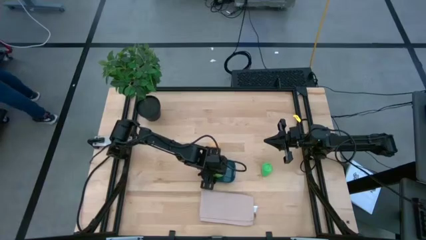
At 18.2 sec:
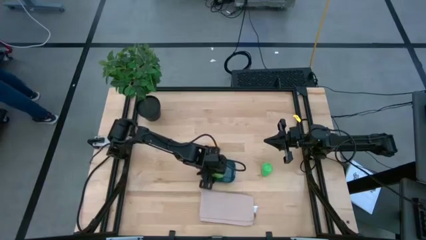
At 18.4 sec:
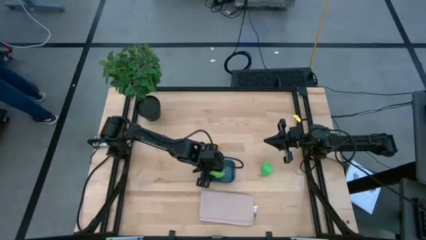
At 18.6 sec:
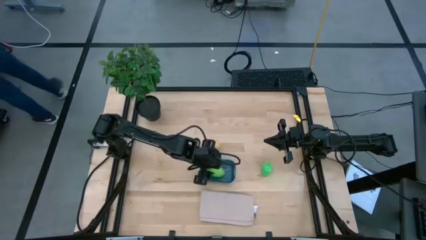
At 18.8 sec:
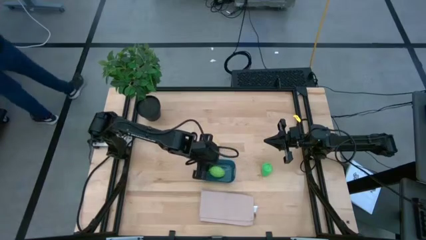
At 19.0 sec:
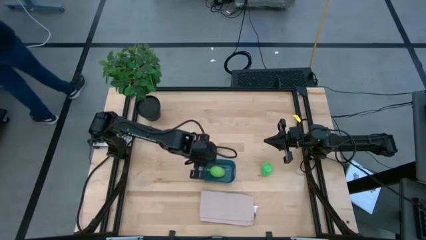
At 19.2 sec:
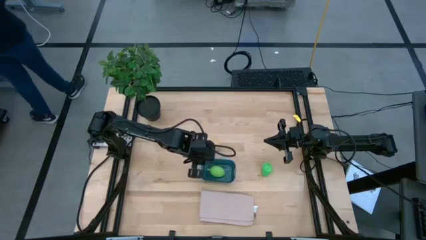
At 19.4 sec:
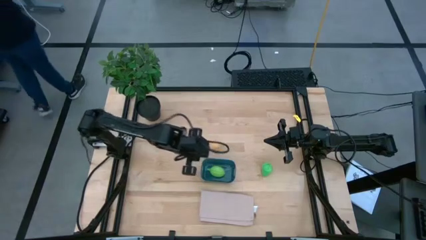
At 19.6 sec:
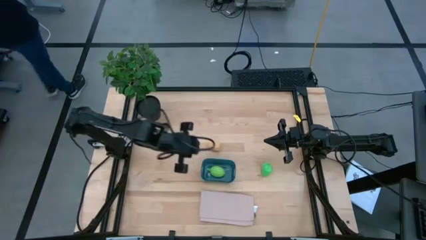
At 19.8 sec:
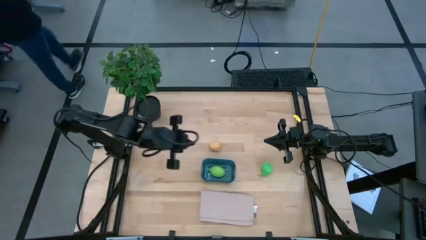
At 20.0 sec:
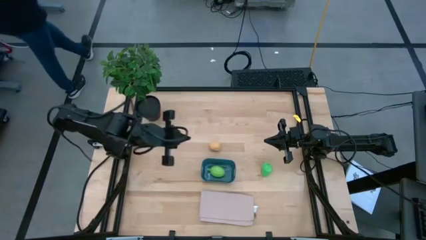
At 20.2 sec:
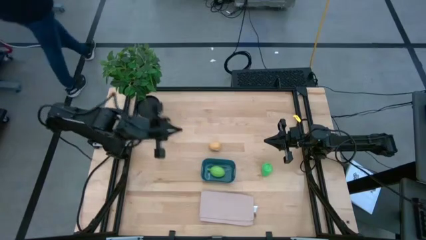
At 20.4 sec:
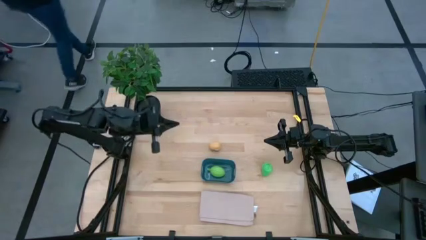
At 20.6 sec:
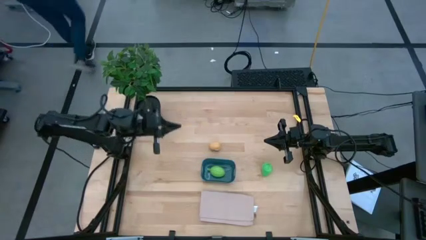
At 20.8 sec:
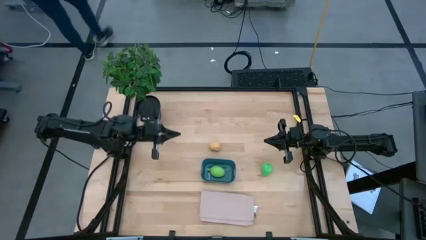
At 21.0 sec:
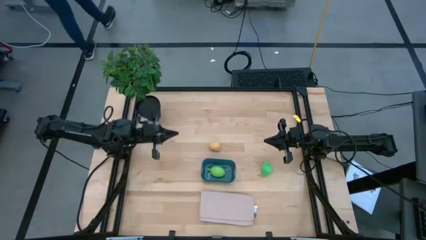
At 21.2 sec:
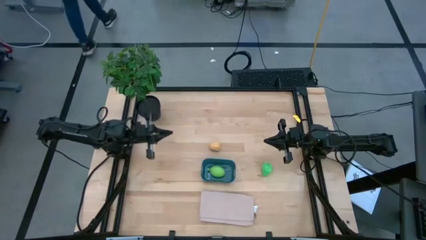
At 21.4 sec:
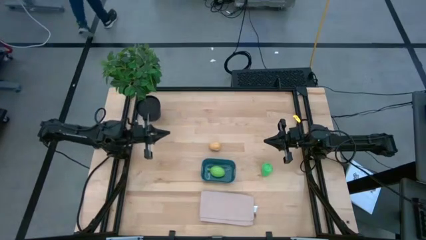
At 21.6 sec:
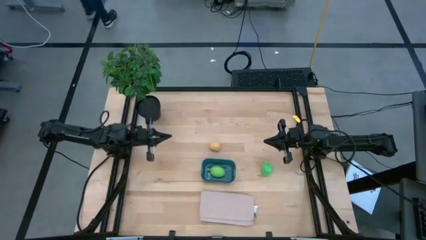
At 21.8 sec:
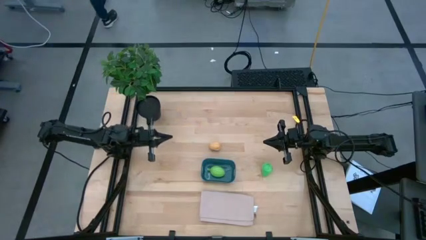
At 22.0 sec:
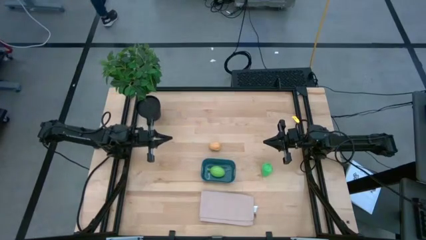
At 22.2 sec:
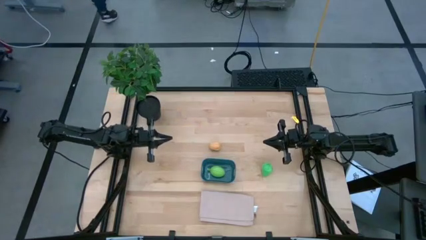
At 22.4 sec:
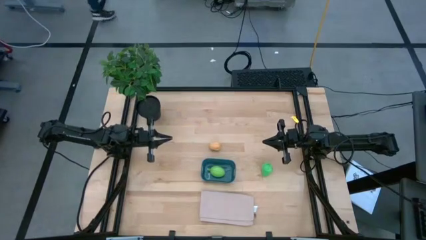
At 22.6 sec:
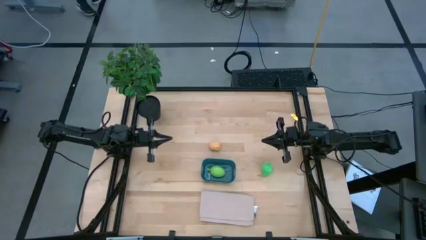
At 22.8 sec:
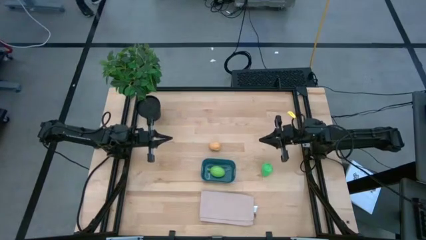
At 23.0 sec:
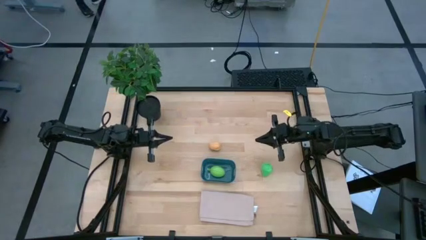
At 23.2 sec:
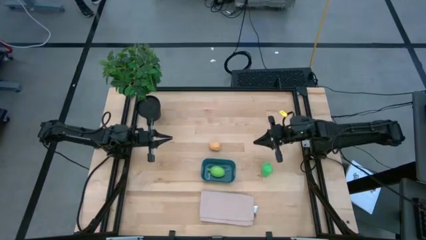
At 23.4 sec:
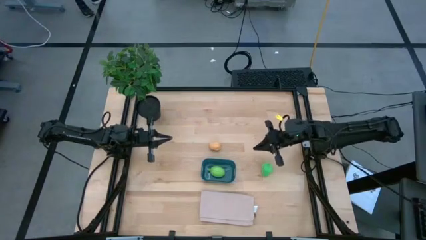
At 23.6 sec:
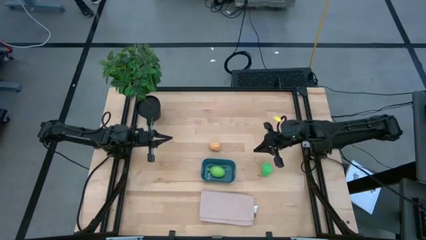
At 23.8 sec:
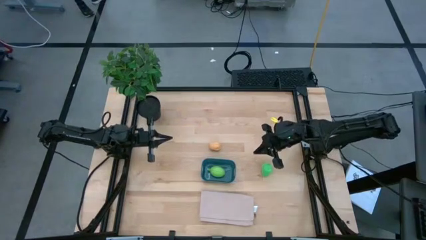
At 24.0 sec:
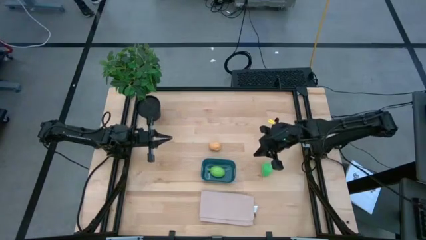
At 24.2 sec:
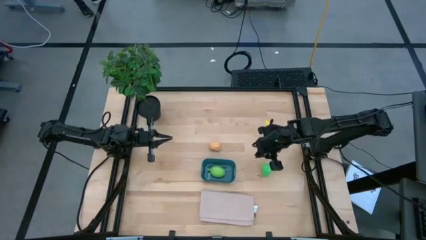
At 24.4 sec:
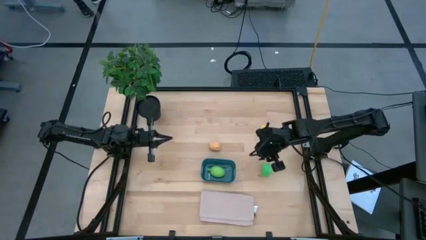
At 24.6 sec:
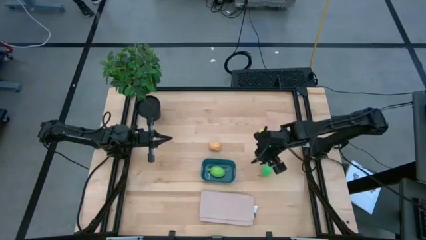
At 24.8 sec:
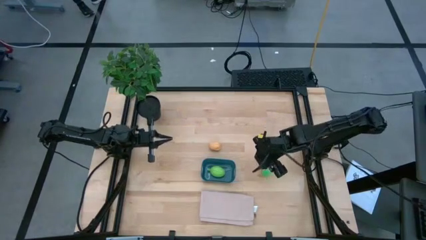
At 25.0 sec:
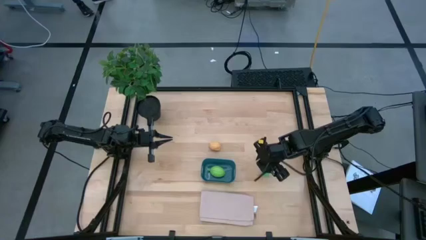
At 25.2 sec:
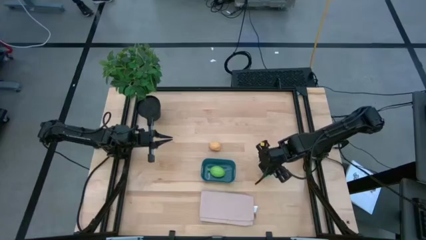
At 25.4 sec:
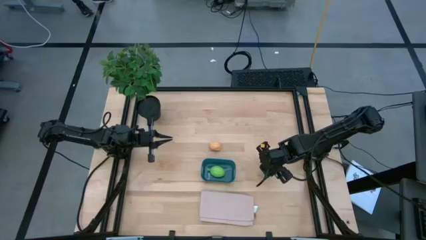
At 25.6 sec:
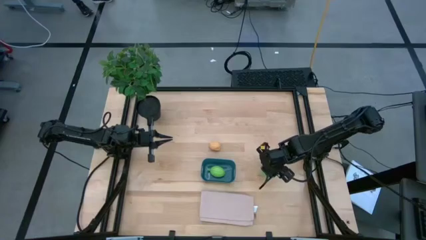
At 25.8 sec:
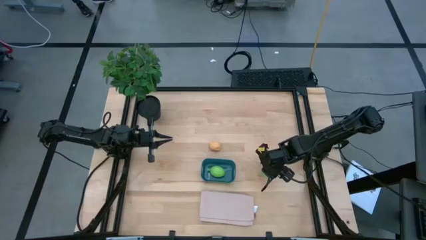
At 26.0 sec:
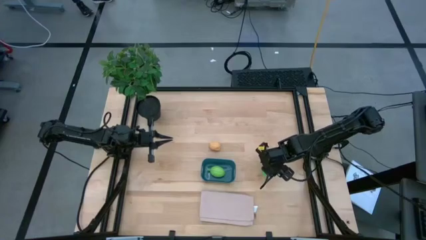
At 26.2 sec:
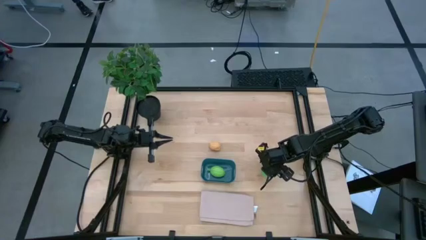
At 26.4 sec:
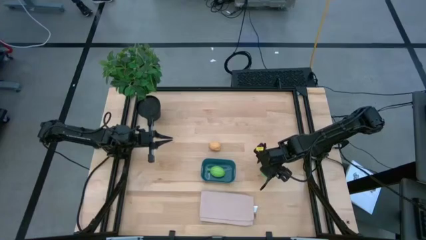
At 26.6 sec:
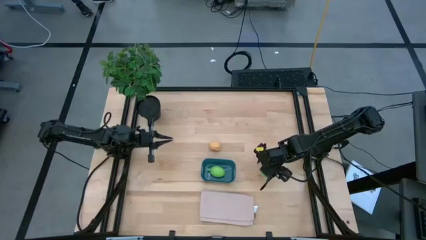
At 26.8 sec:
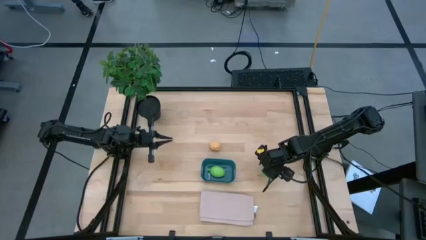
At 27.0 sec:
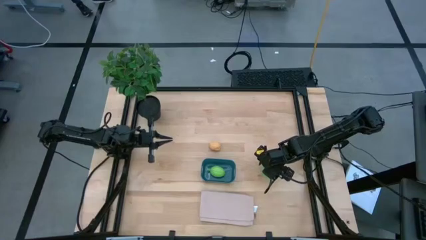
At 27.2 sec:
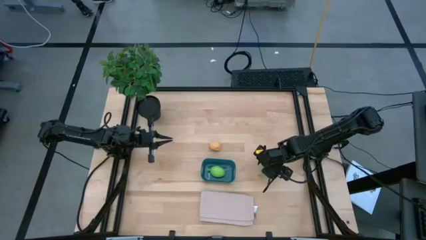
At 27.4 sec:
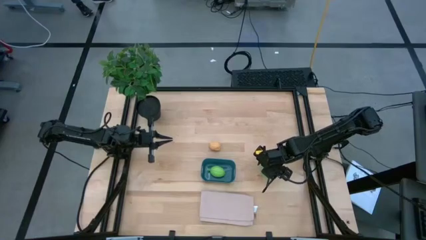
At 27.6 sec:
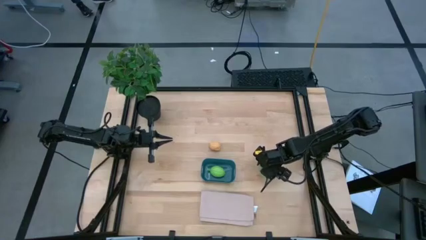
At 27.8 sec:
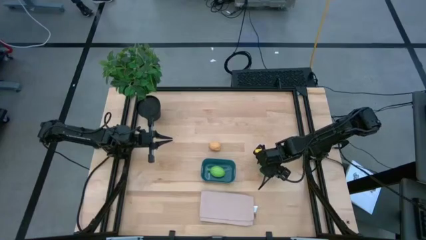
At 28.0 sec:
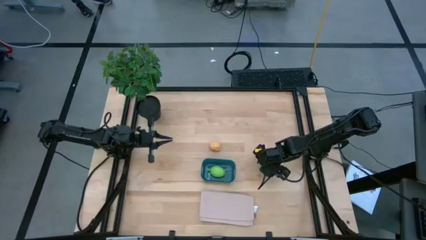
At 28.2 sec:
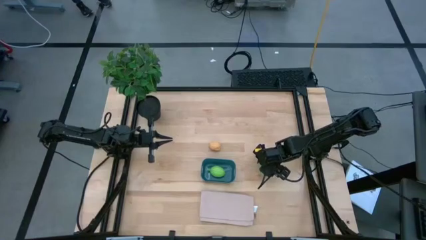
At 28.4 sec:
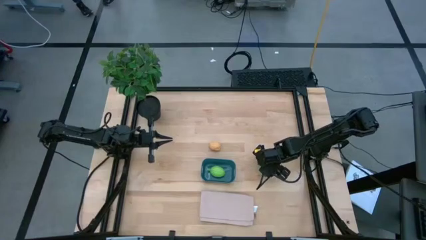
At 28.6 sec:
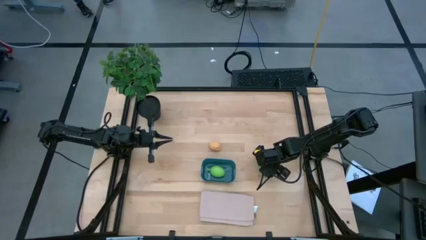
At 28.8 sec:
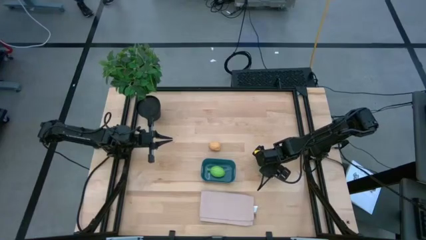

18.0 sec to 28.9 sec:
Task: Pick and placing Produce into tupperware
Put the green pear into the blue bin
